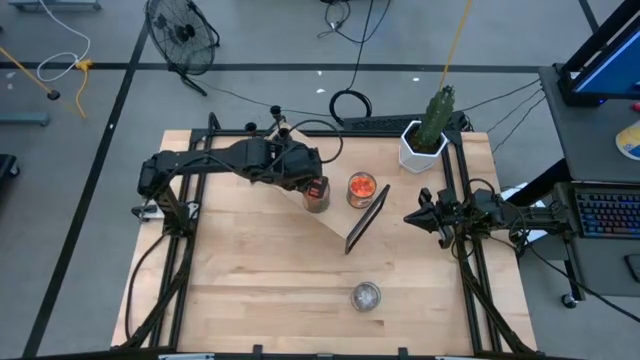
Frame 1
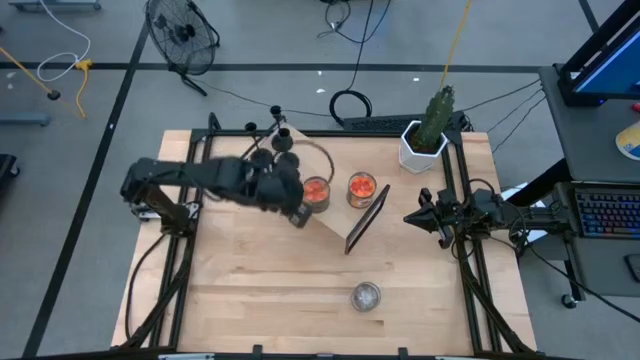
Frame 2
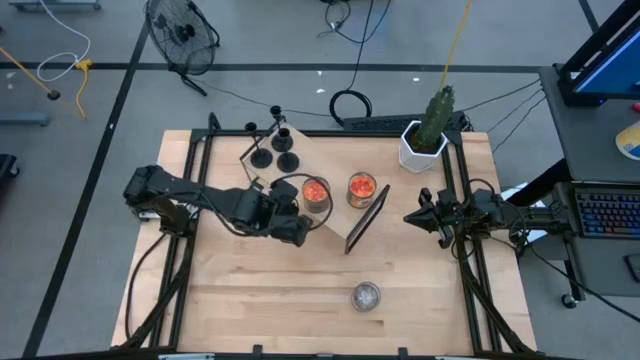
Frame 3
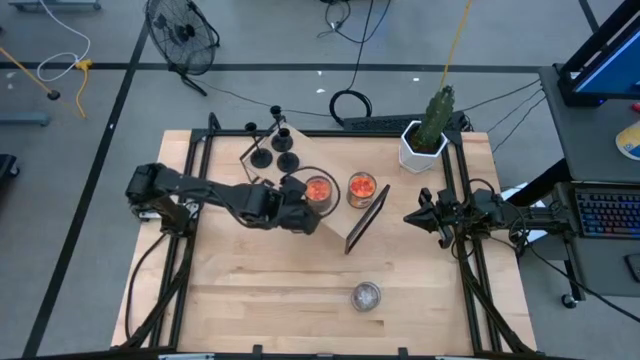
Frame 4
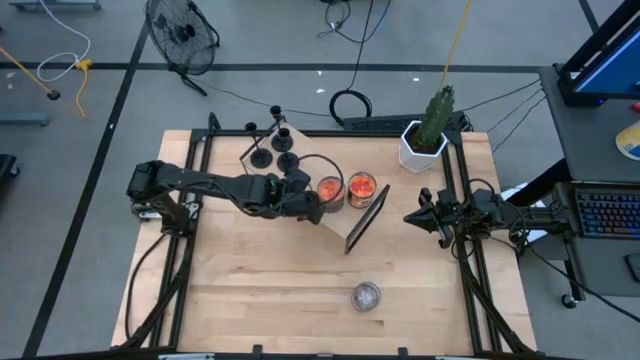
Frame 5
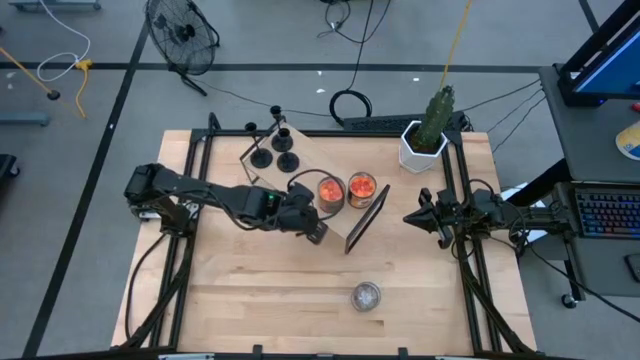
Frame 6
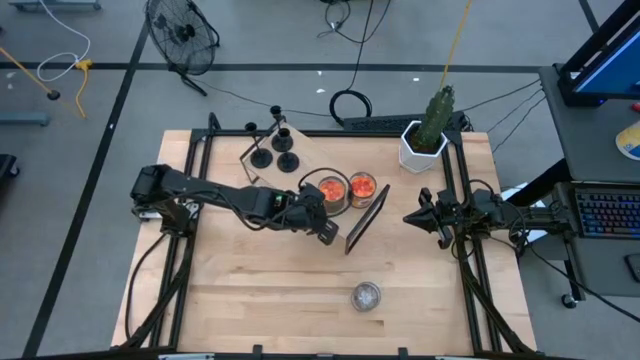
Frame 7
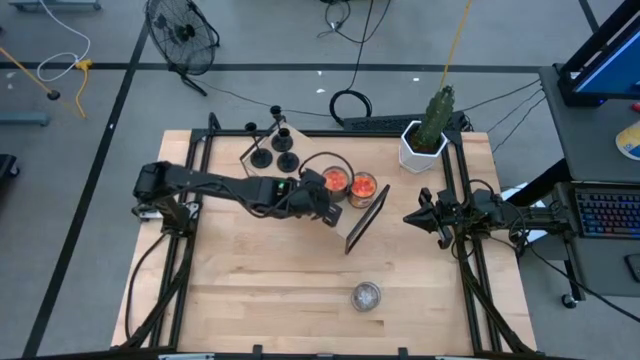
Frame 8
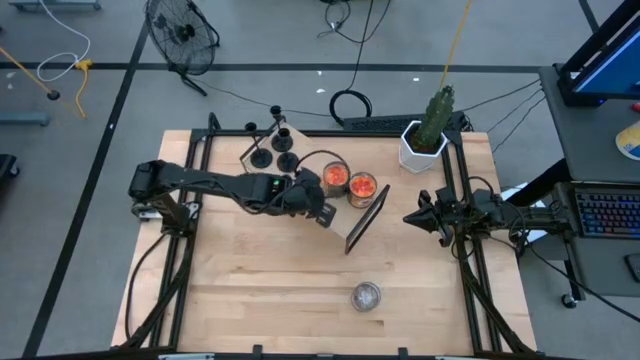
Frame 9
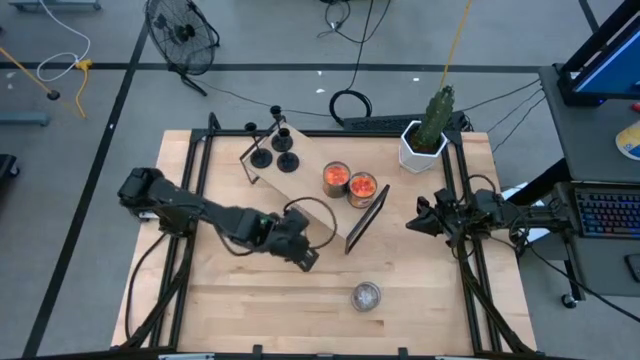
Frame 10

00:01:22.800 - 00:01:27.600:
Task: Pick & Place candle stick holders
Adjust the right orange black candle tin to align with the others

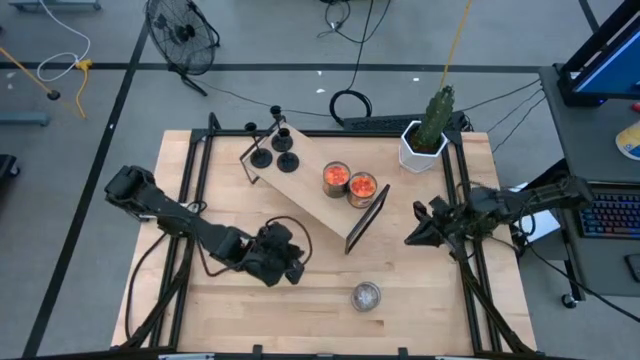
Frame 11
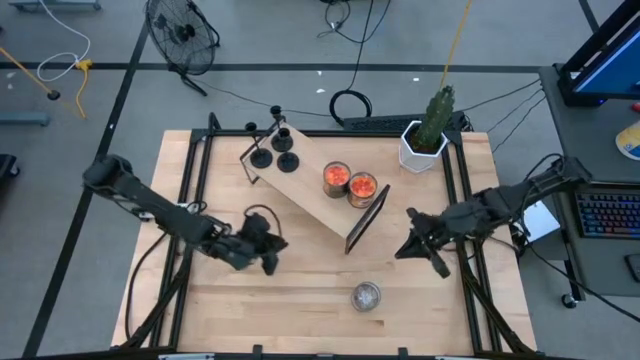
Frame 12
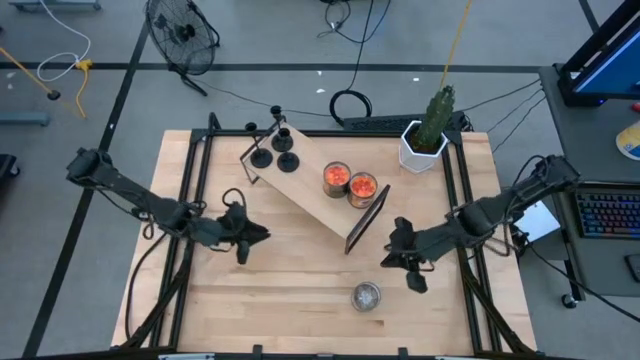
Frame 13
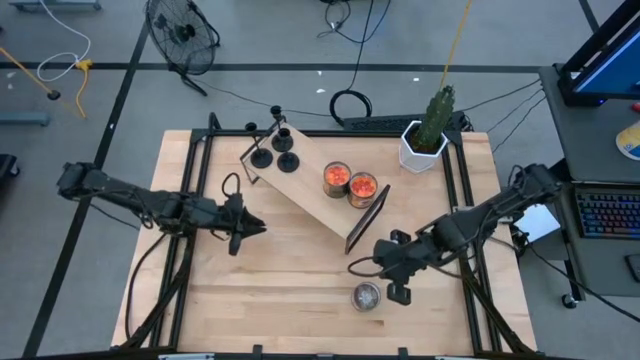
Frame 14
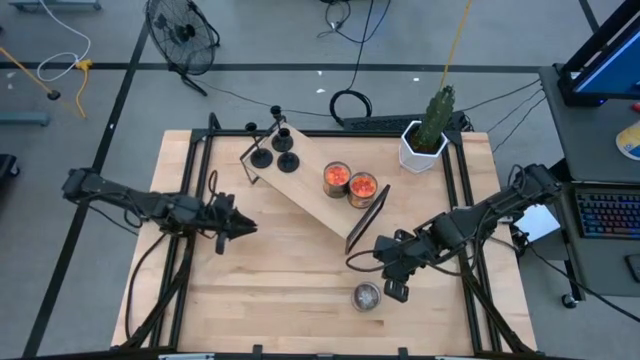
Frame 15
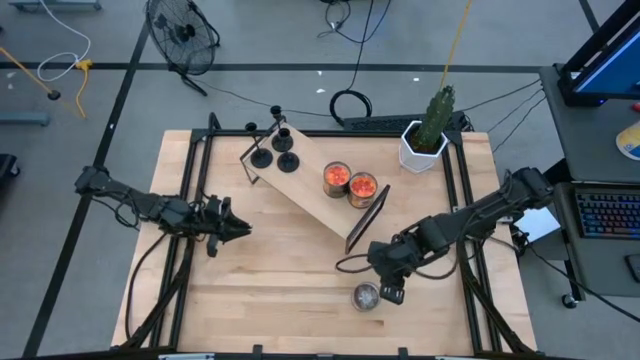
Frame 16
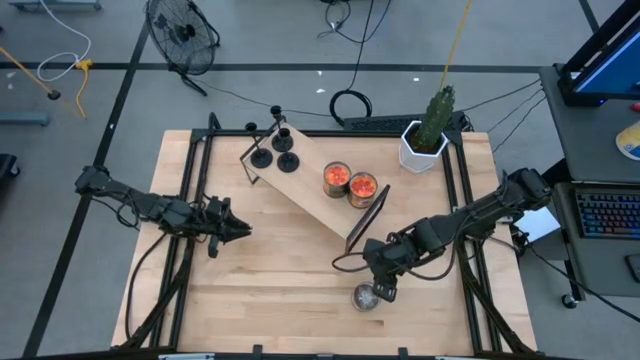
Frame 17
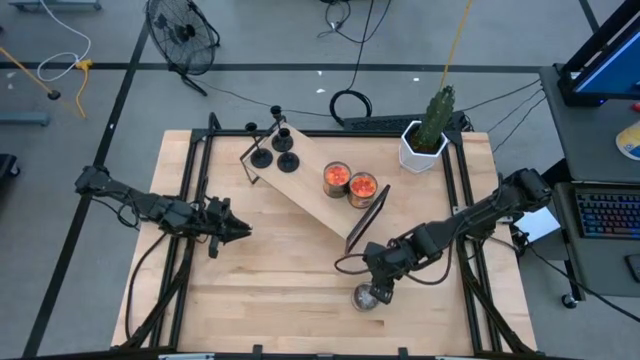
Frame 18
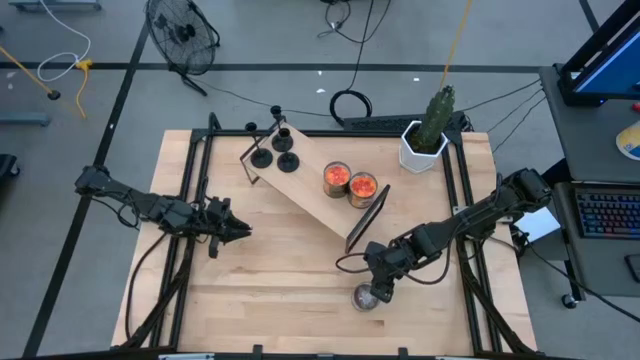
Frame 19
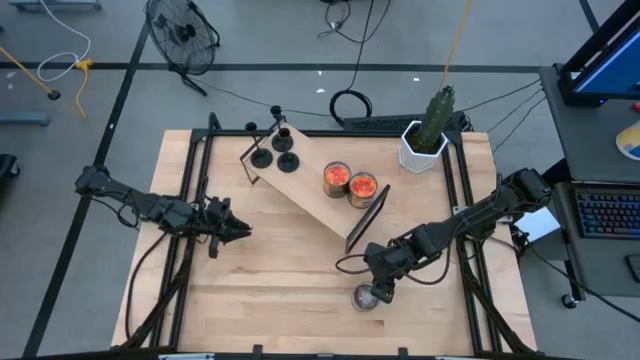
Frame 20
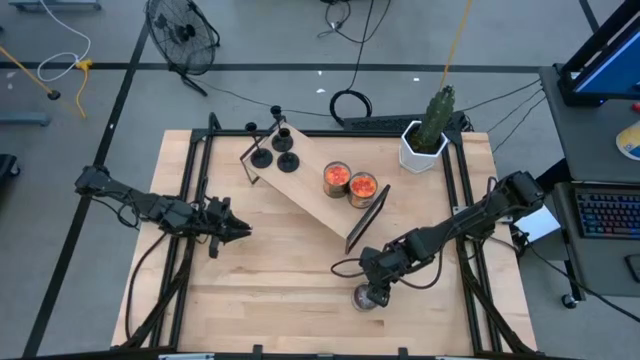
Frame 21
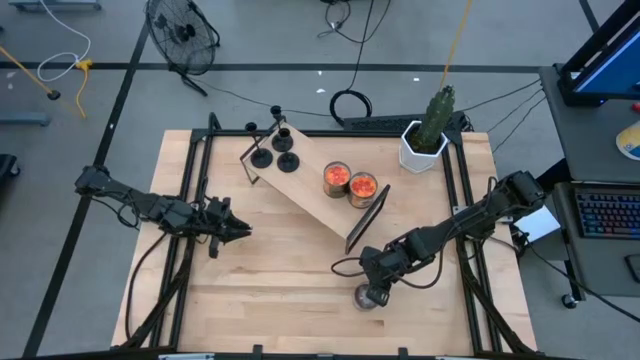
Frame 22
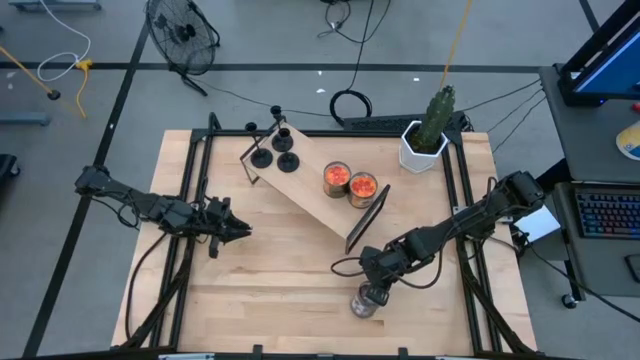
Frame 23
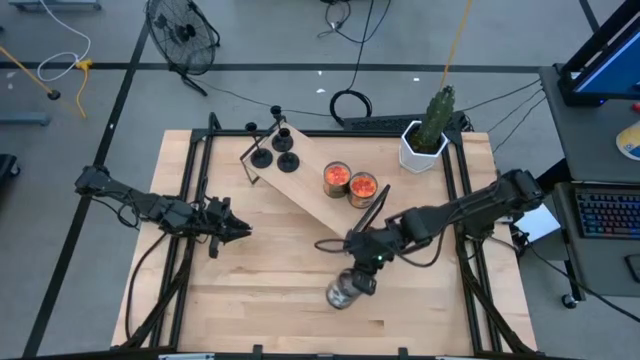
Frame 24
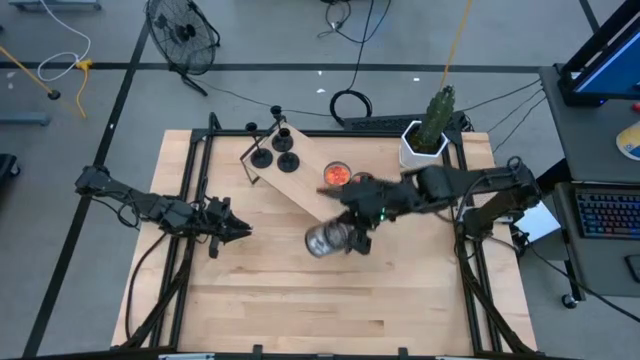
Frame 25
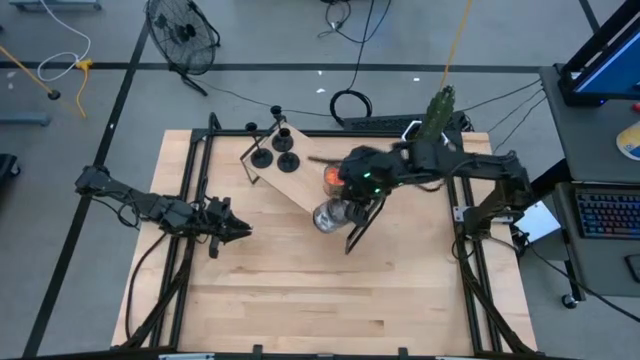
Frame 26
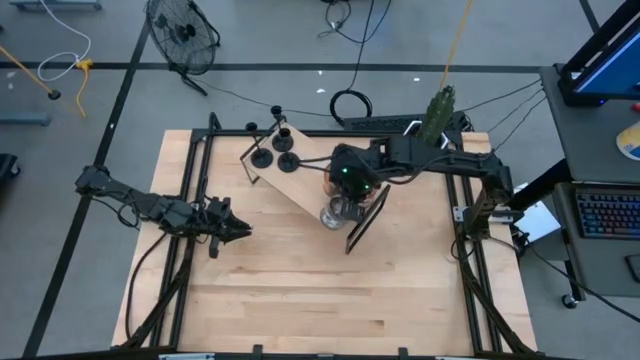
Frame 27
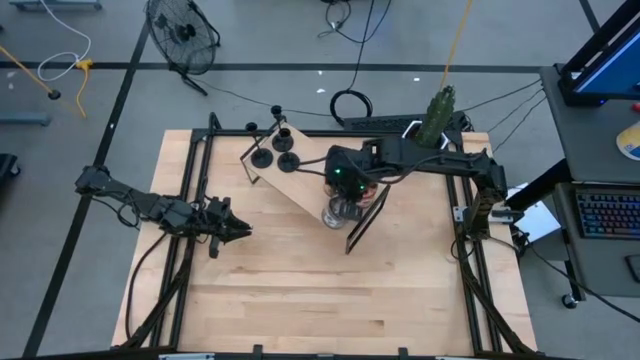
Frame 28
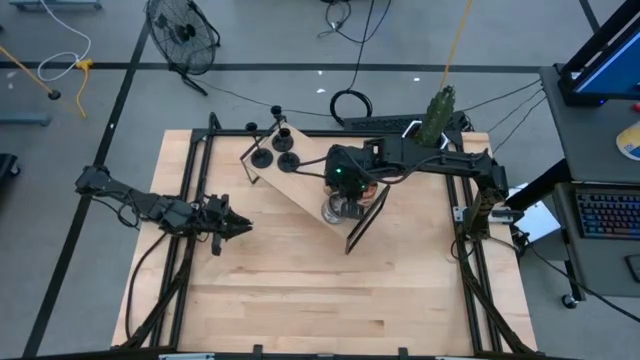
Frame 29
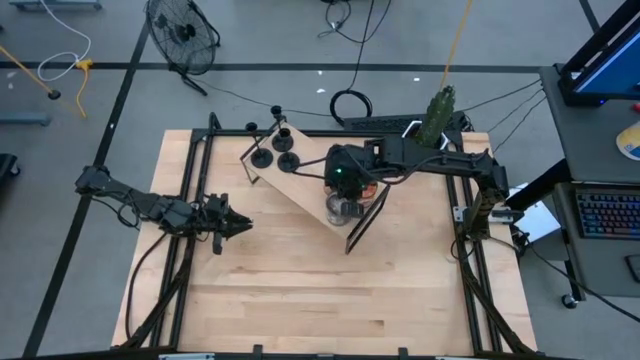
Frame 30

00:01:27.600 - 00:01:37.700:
Put the right brown black candle tin on the shelf

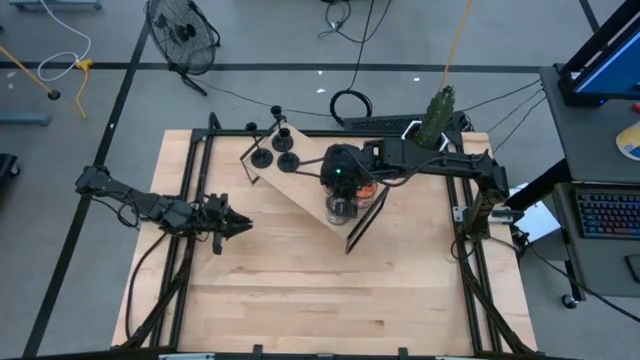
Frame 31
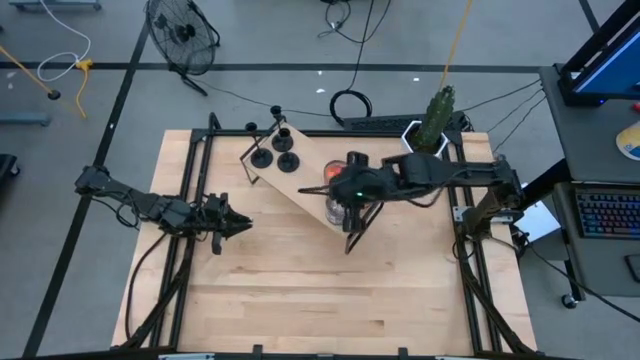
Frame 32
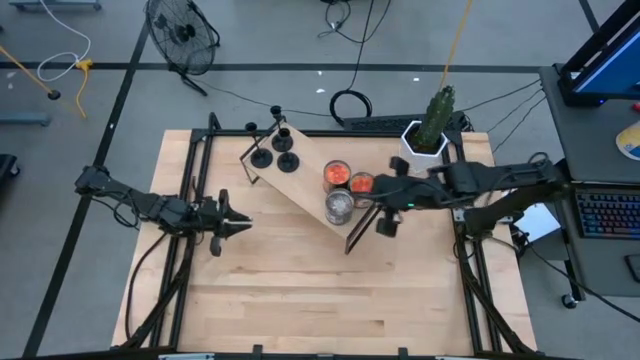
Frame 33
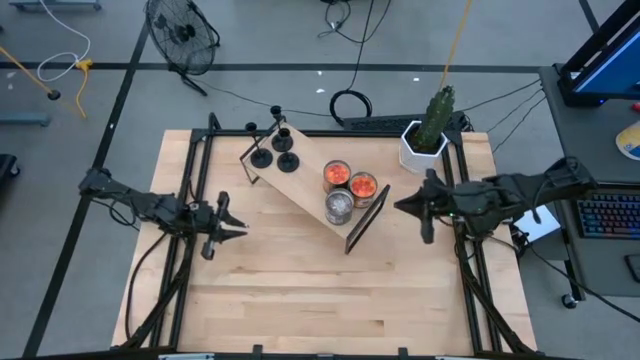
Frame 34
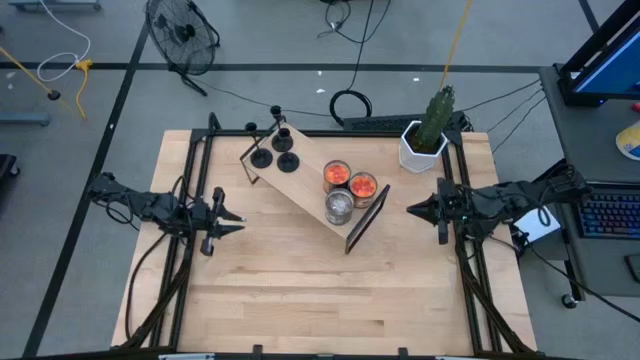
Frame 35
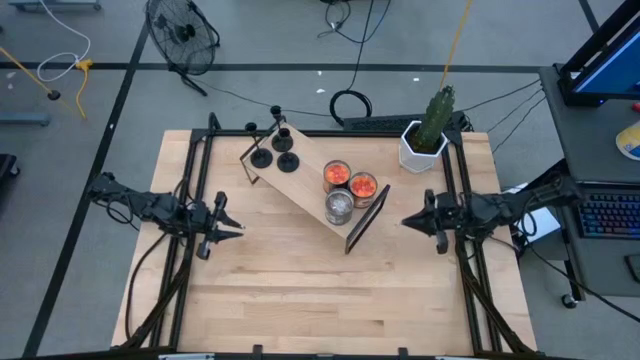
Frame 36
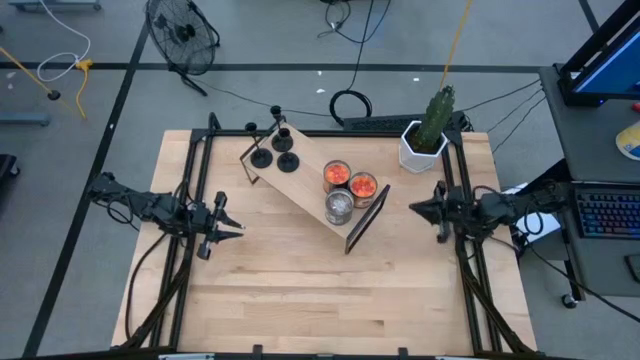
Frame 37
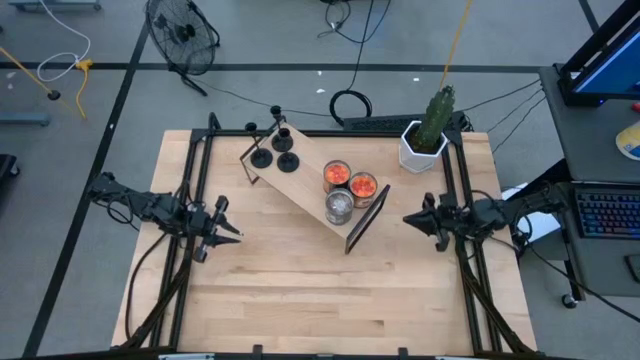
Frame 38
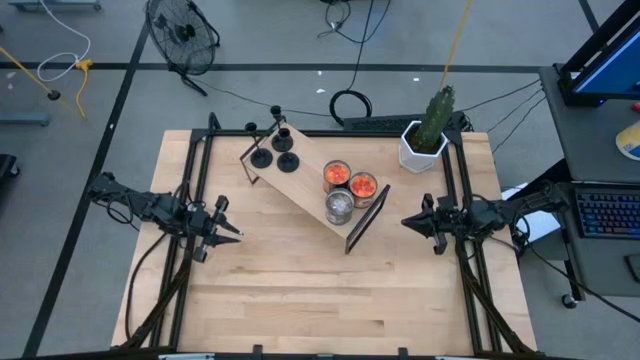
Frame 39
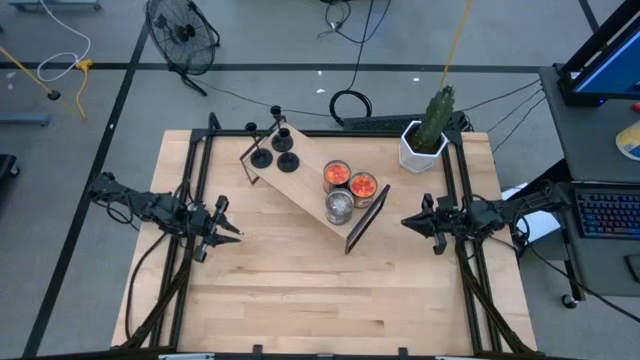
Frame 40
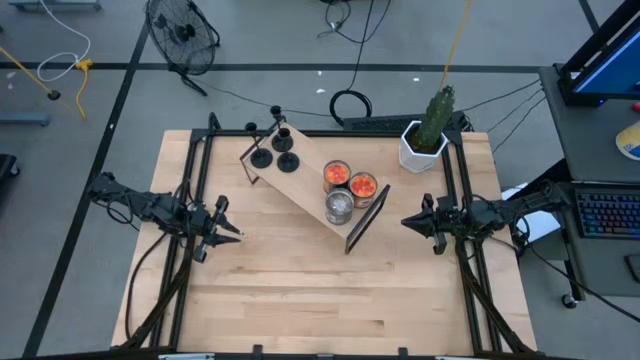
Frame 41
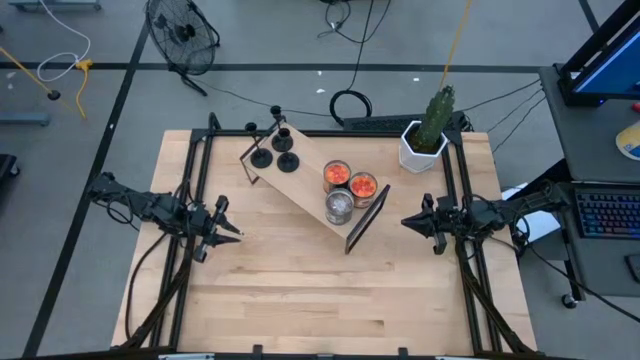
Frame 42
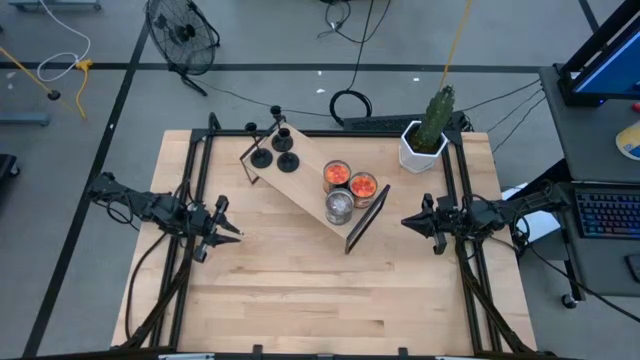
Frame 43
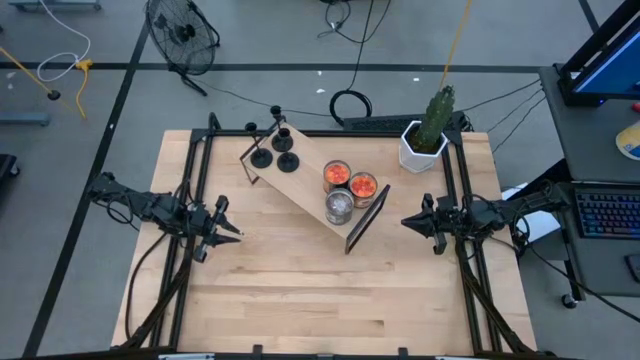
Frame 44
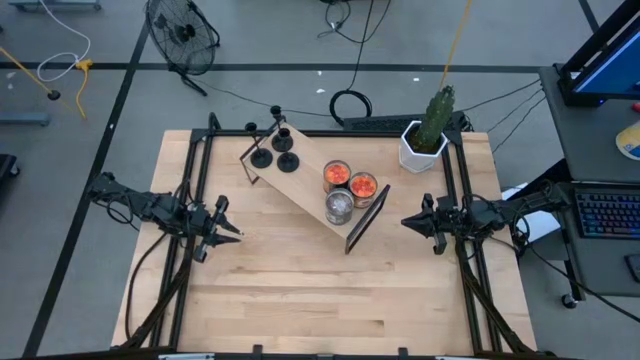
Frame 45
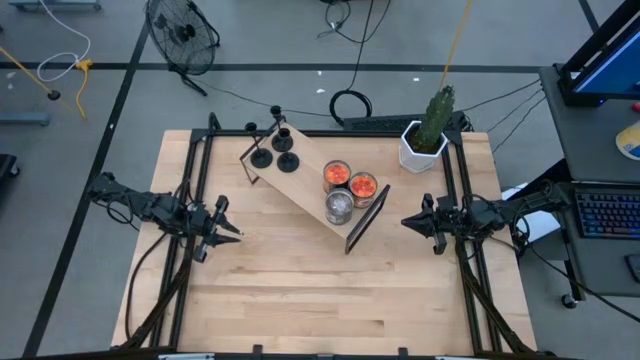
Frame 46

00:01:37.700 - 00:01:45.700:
Return to Home Position
